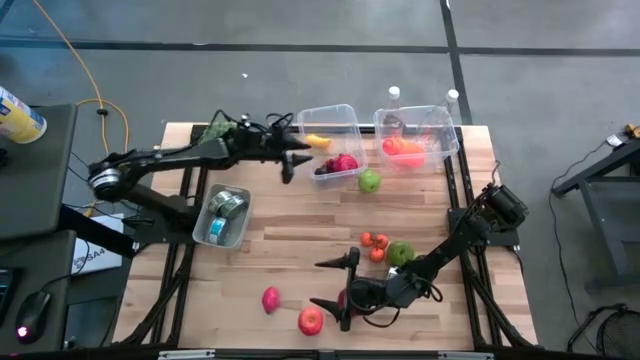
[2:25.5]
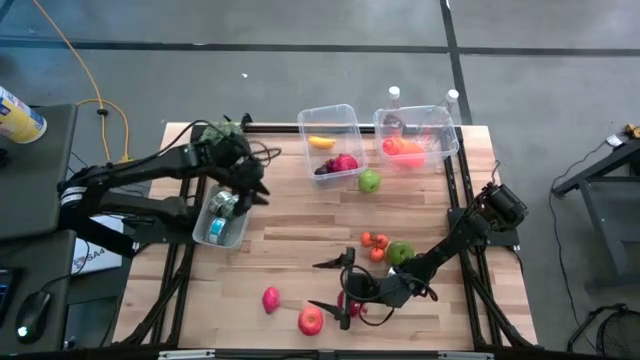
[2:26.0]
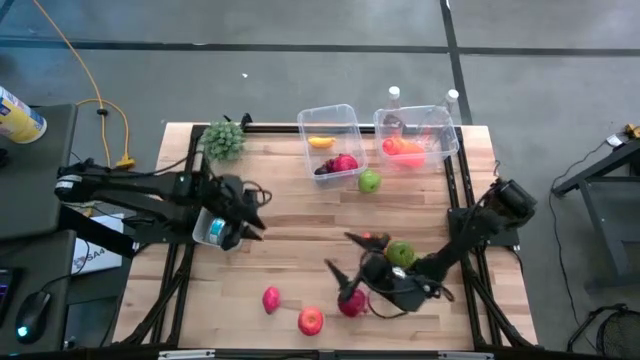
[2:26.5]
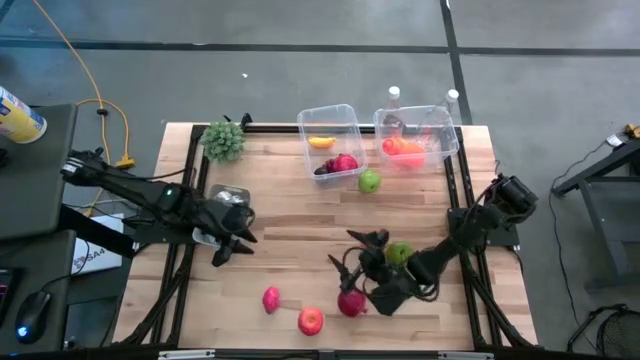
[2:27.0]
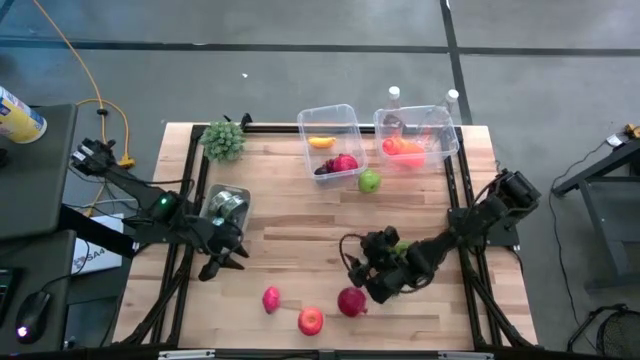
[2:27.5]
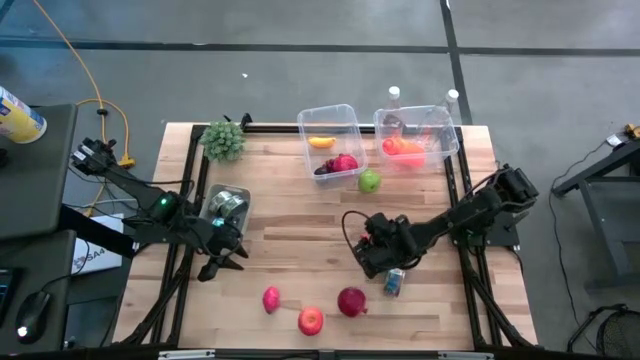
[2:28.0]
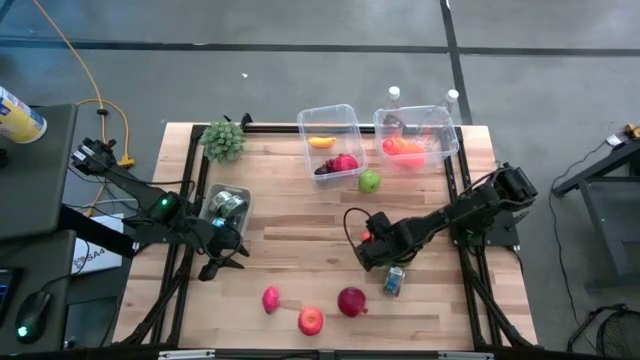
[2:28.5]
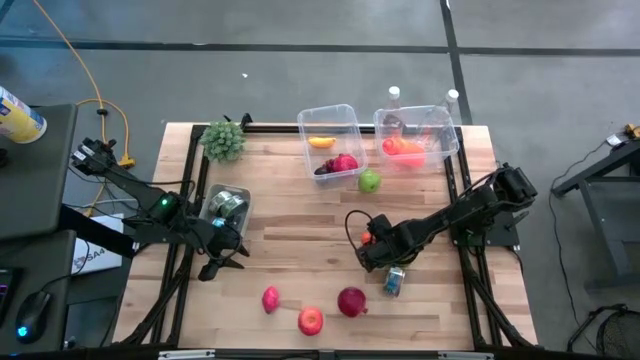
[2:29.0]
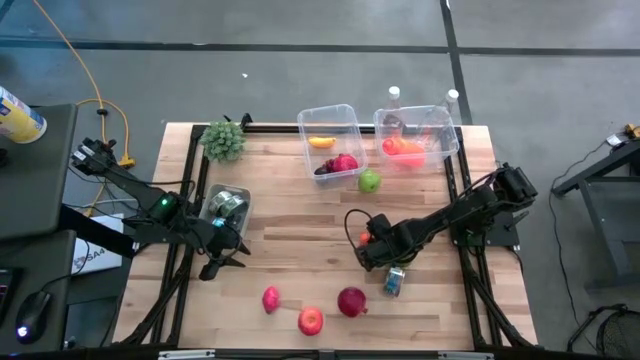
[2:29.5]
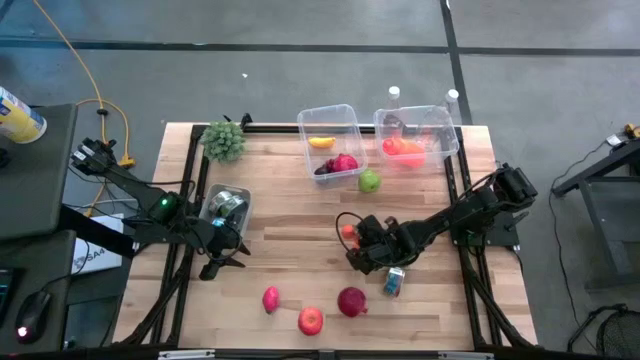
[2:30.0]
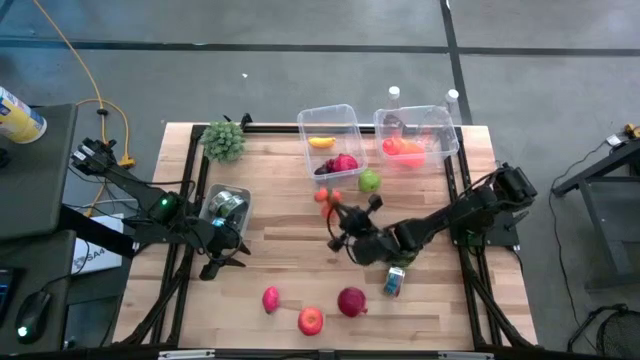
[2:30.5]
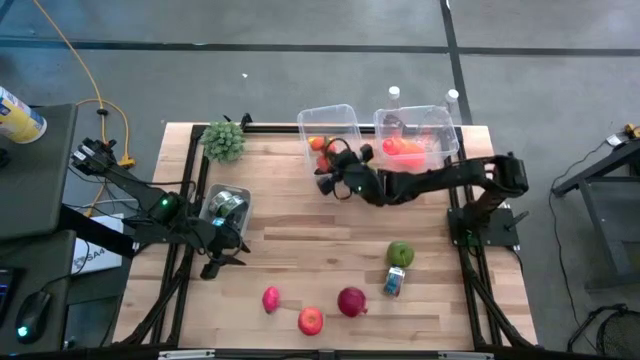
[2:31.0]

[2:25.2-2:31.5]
Task: Pick & Place Food Item
Put the tangerine into the left transparent bin

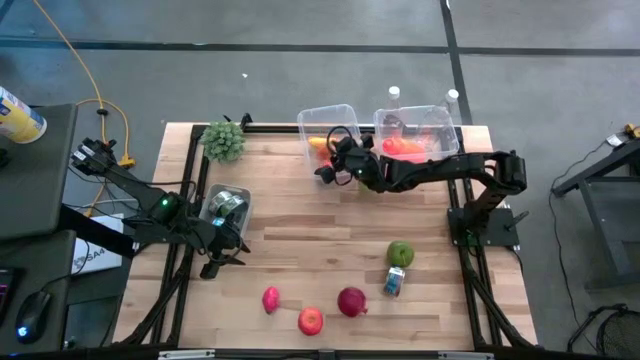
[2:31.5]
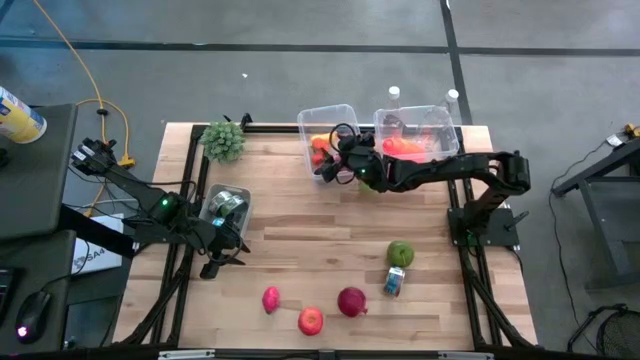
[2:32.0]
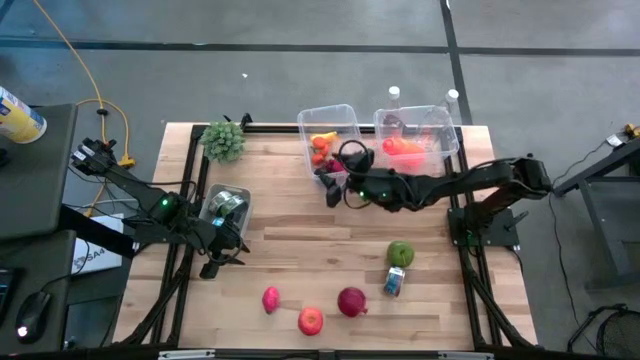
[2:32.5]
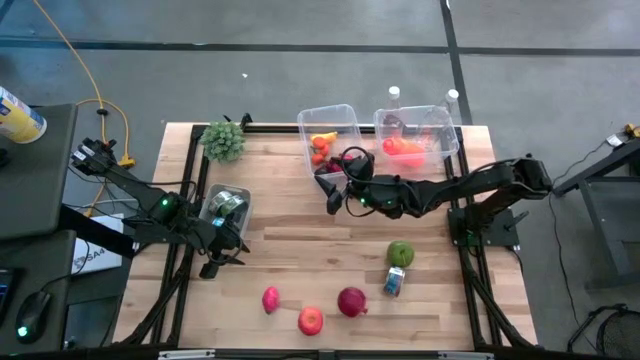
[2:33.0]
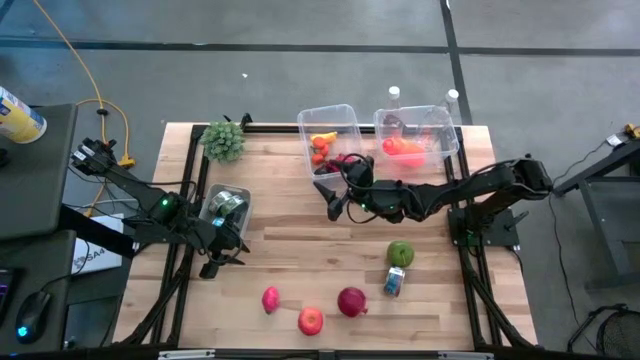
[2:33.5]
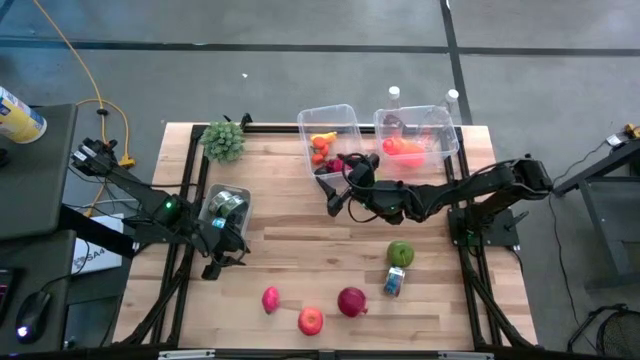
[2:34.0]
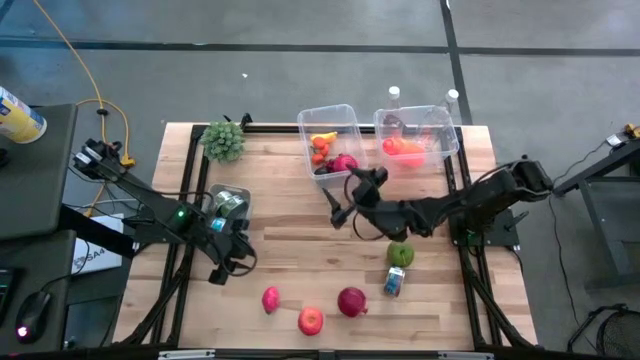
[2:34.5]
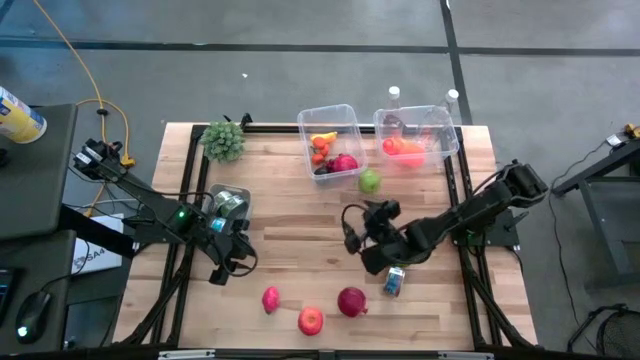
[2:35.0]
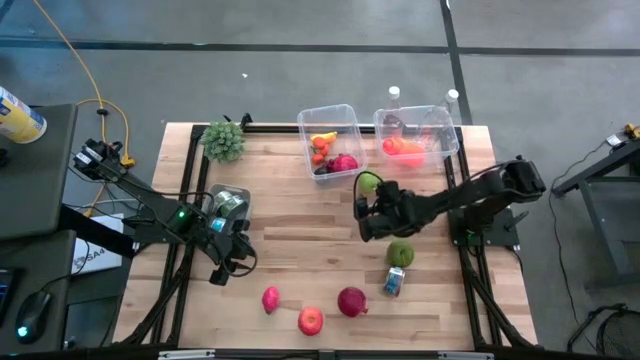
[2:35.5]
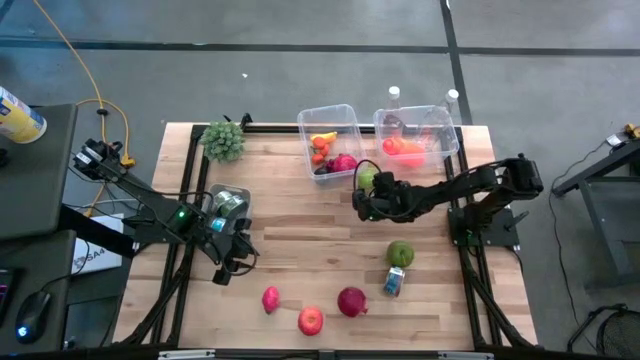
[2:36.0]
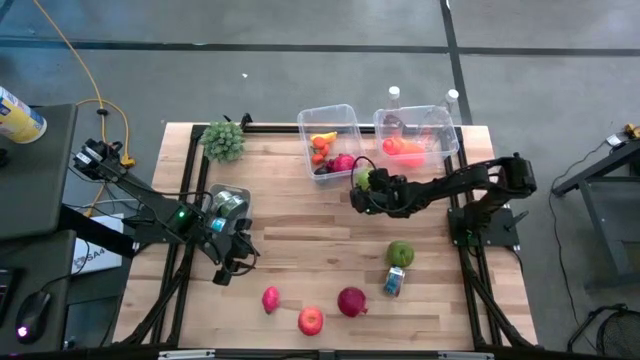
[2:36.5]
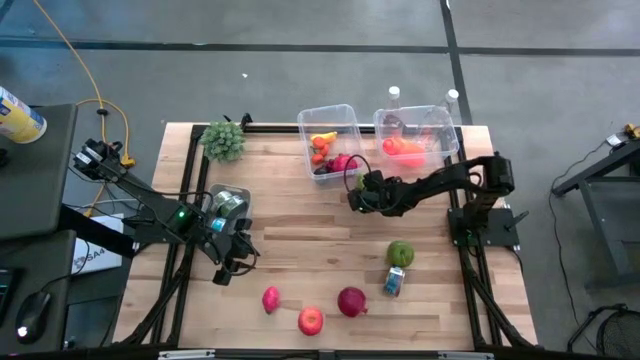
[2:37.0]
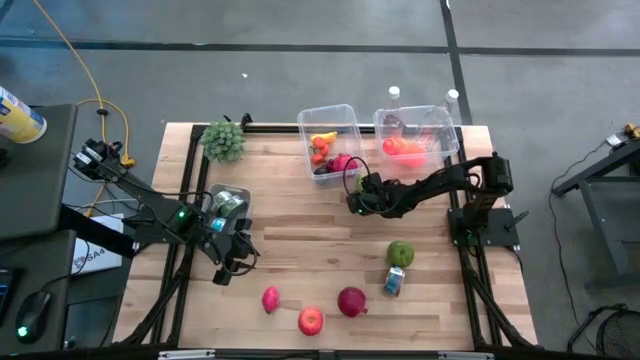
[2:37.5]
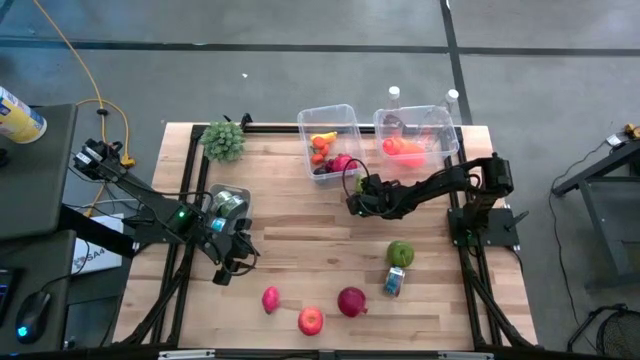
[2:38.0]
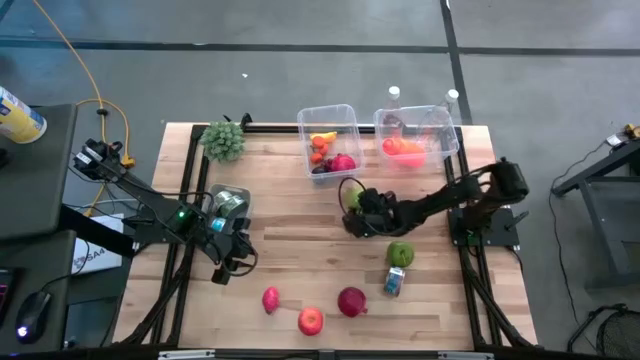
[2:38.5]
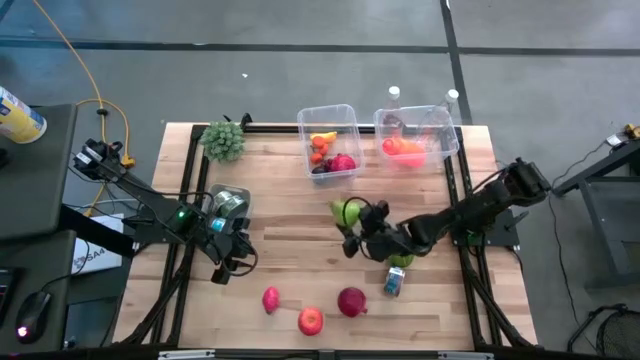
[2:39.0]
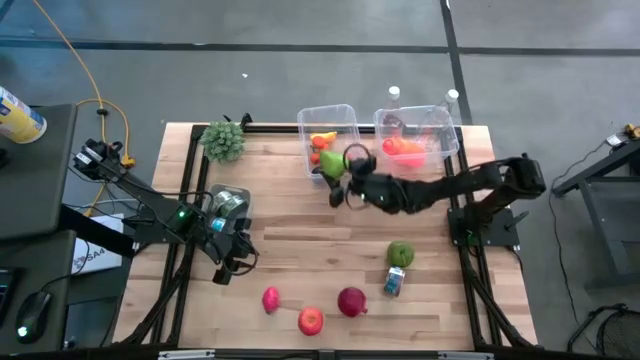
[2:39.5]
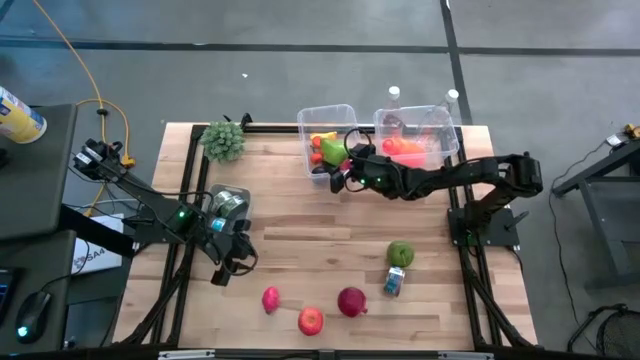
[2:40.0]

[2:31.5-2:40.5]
Put the green pear into the left transparent bin

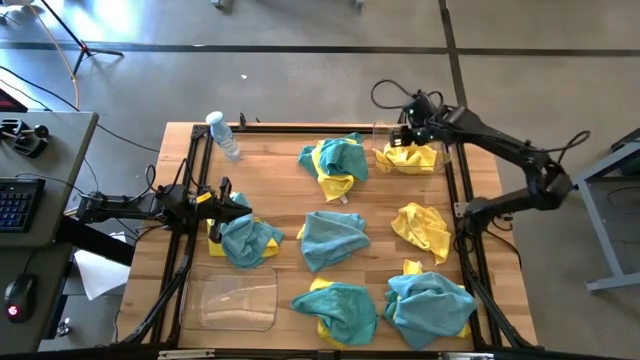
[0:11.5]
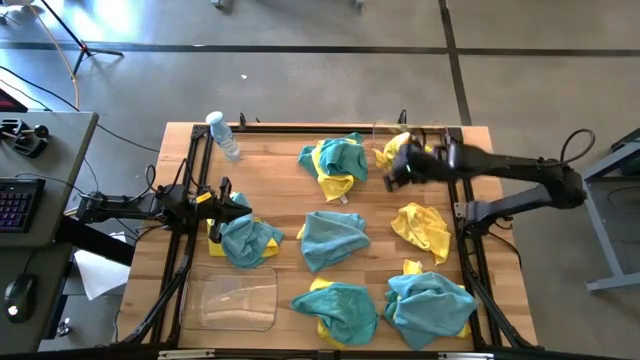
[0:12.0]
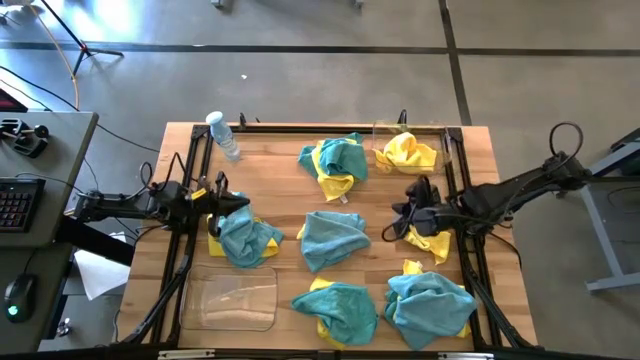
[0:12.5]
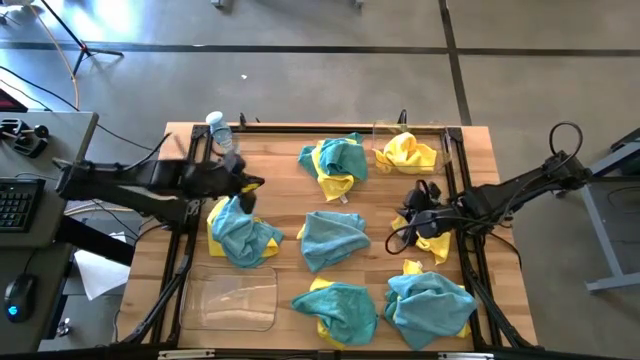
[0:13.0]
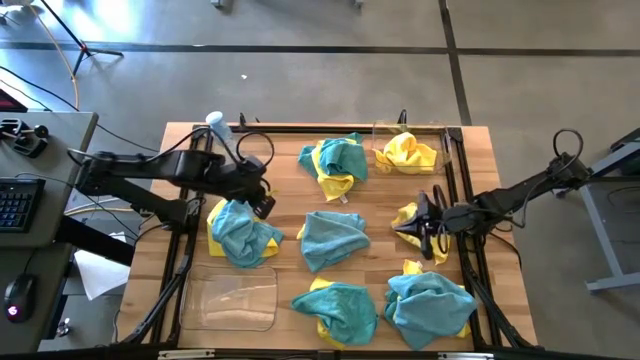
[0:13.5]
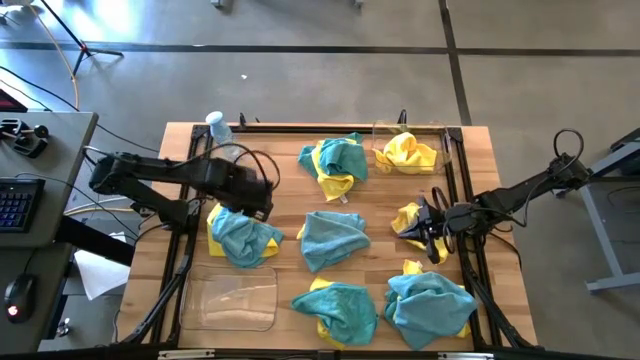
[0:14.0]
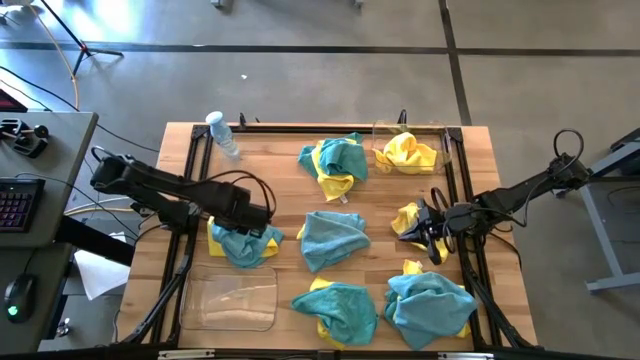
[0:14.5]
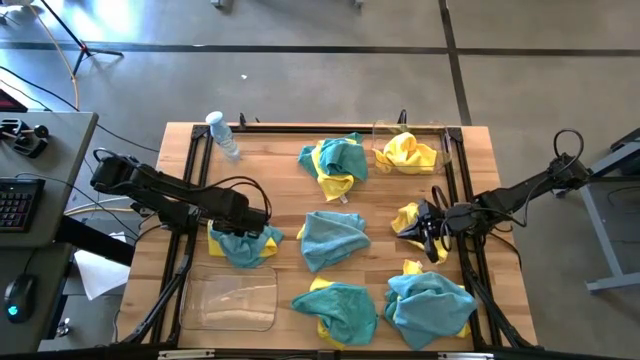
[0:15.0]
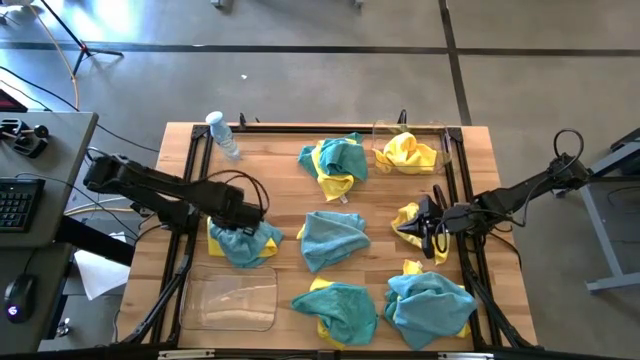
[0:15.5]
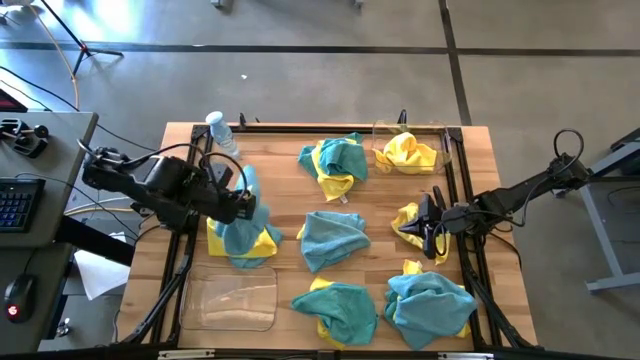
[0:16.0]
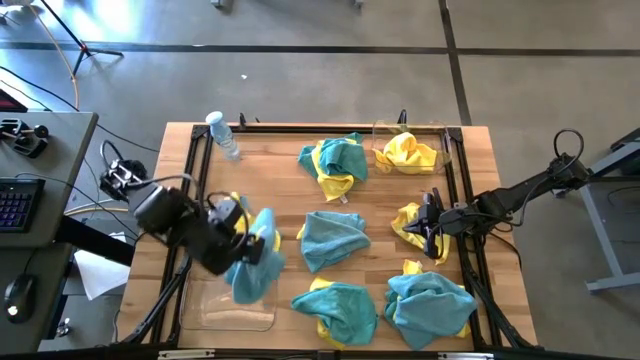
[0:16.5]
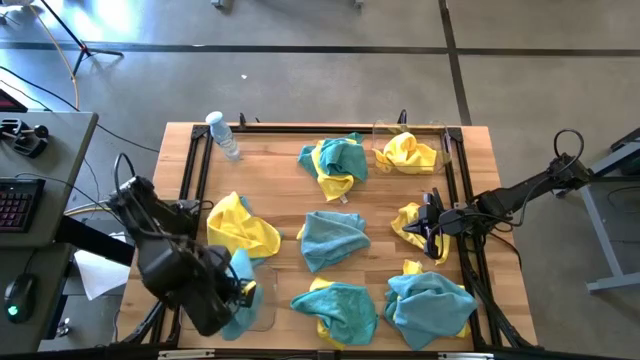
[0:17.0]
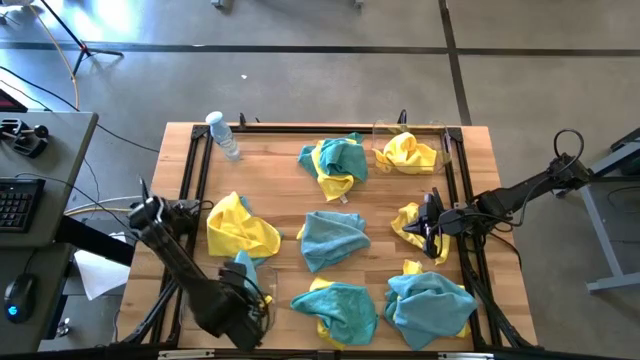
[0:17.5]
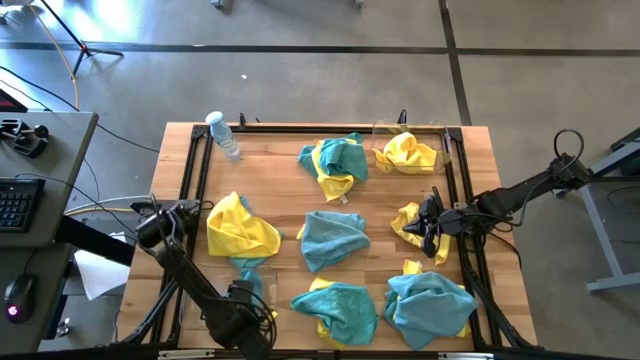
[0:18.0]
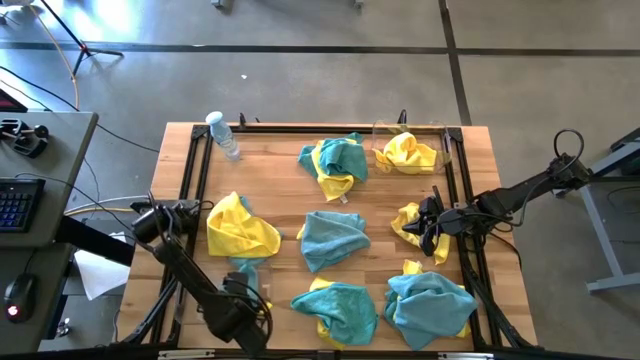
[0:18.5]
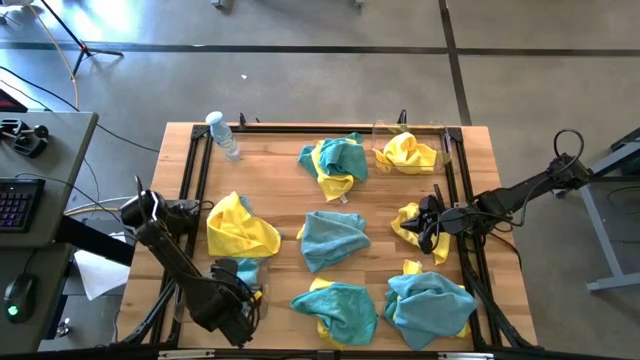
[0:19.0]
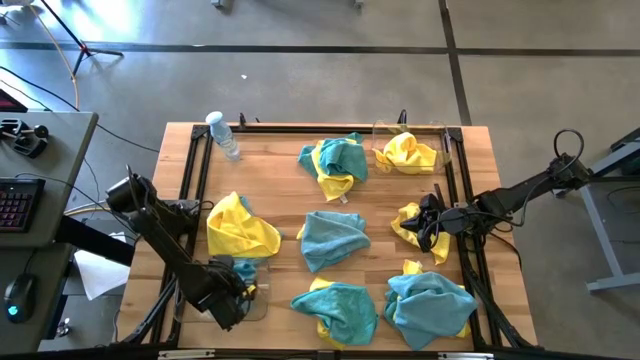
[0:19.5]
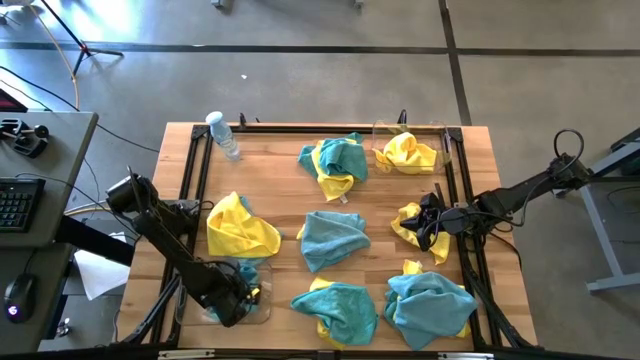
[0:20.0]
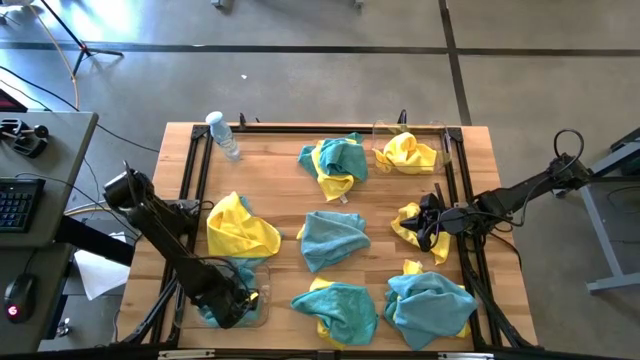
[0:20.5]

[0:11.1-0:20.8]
Task: Sort microfiber towel by color & place in baskets
Put the blue microfiber towel into the bottom transparent bin
